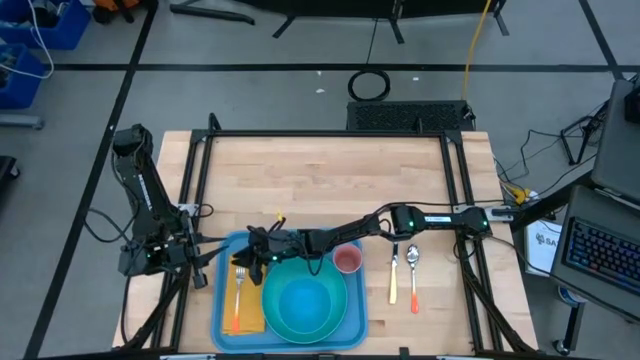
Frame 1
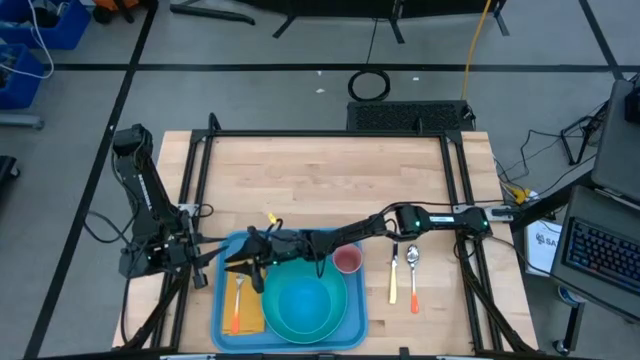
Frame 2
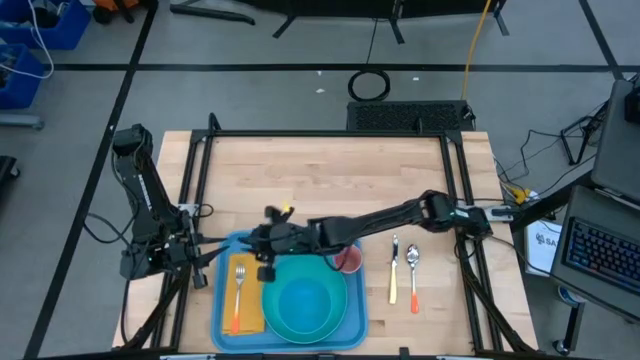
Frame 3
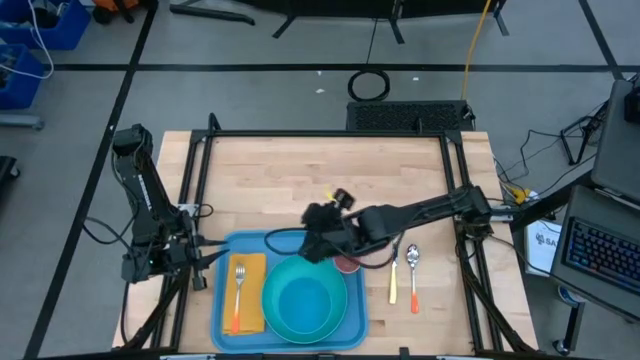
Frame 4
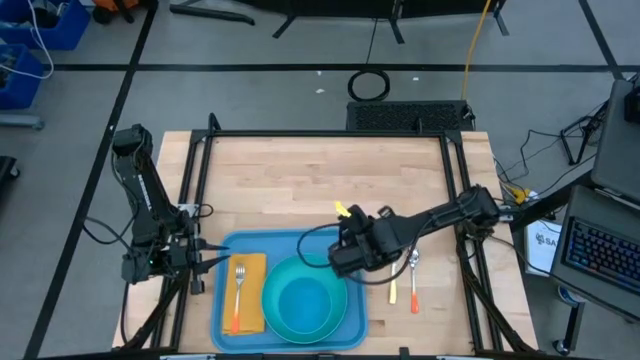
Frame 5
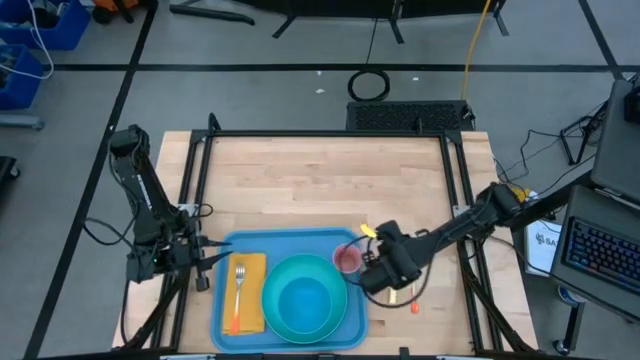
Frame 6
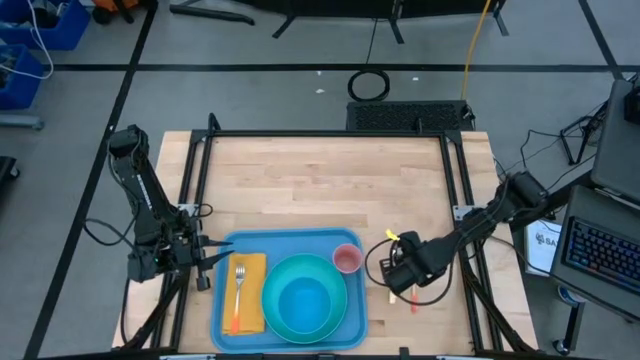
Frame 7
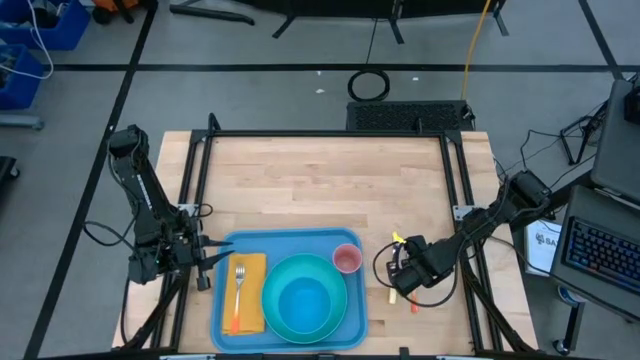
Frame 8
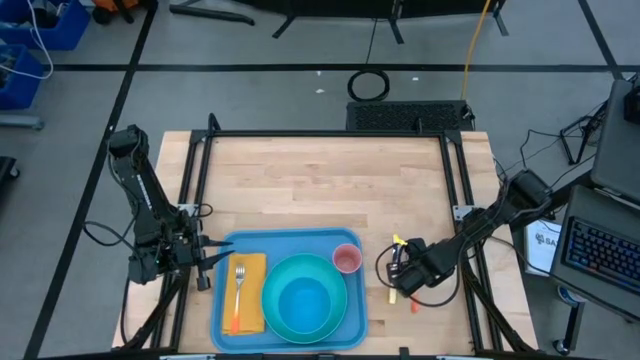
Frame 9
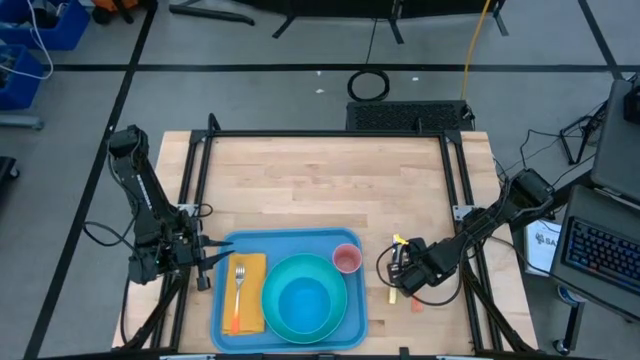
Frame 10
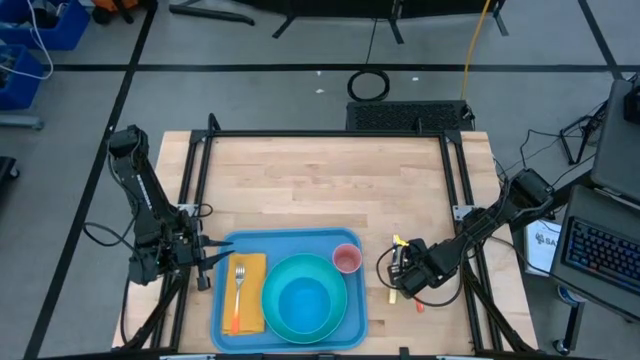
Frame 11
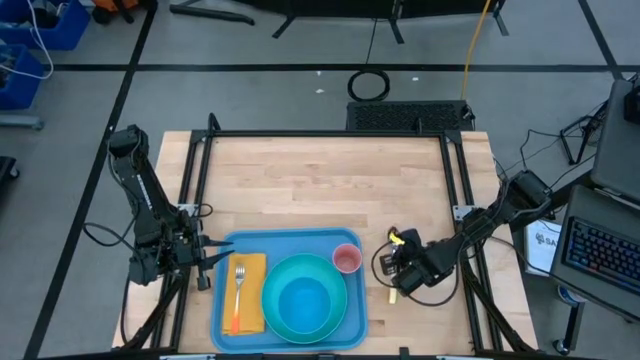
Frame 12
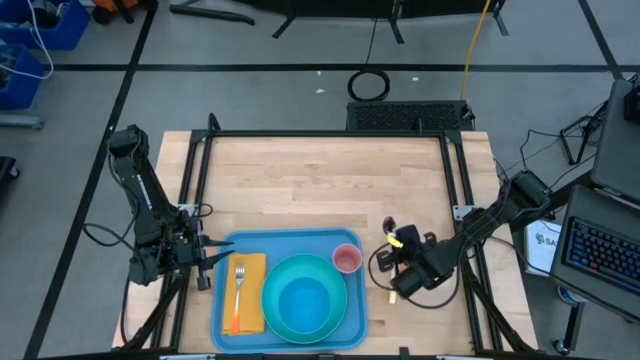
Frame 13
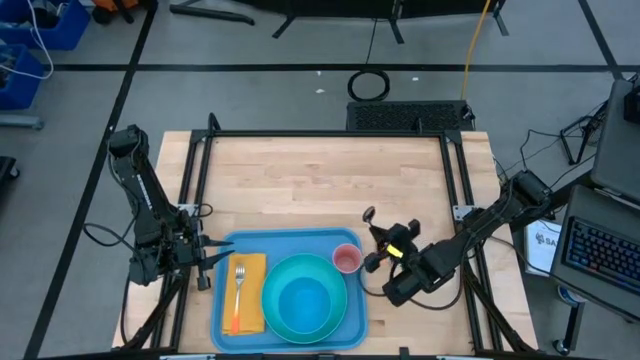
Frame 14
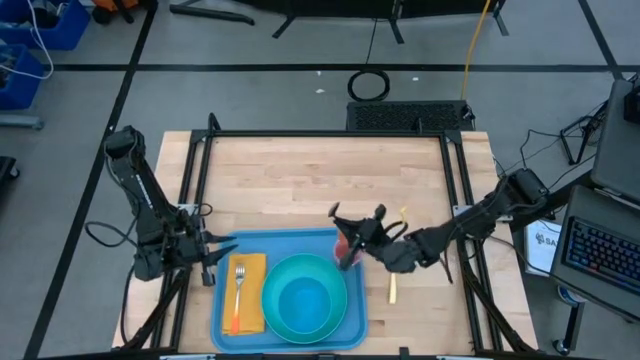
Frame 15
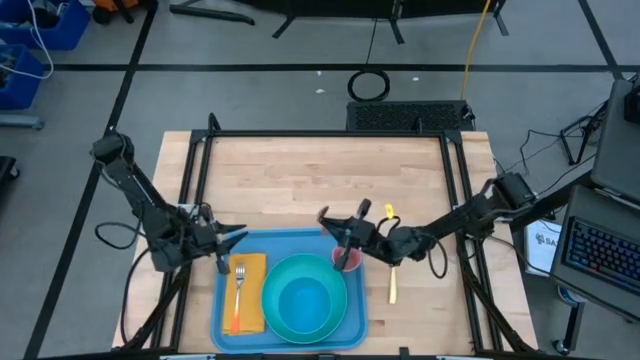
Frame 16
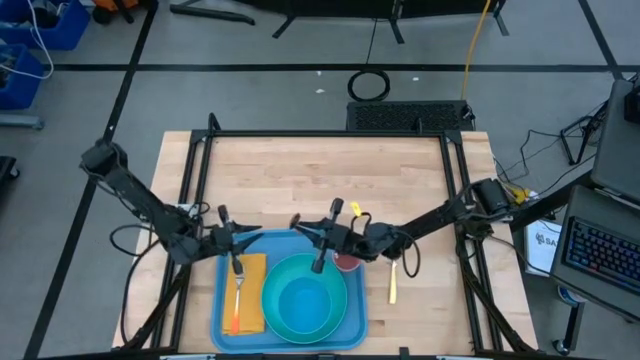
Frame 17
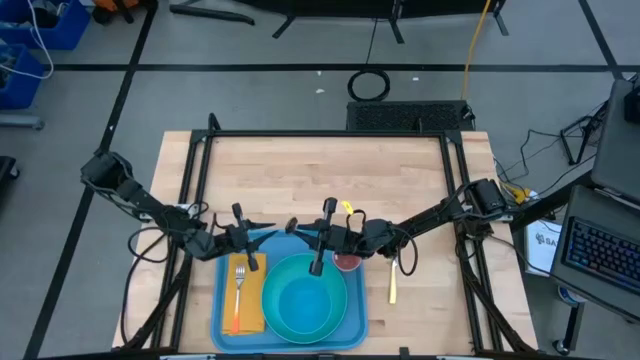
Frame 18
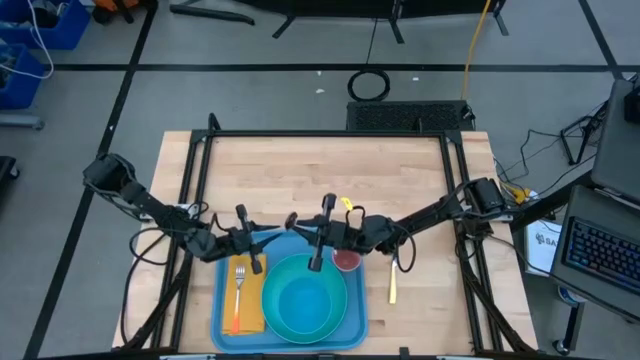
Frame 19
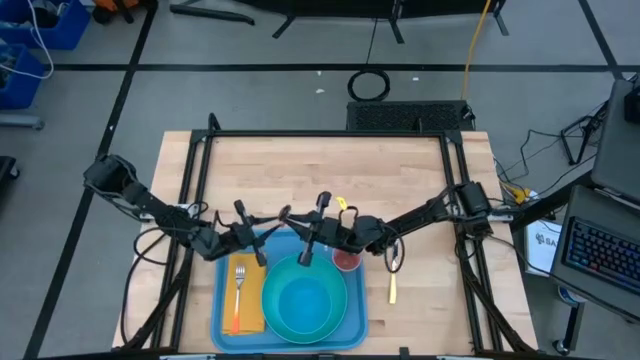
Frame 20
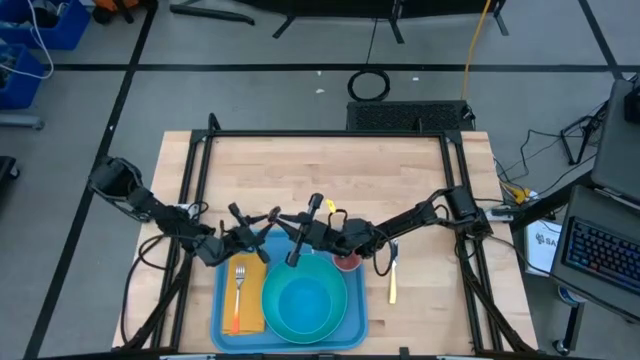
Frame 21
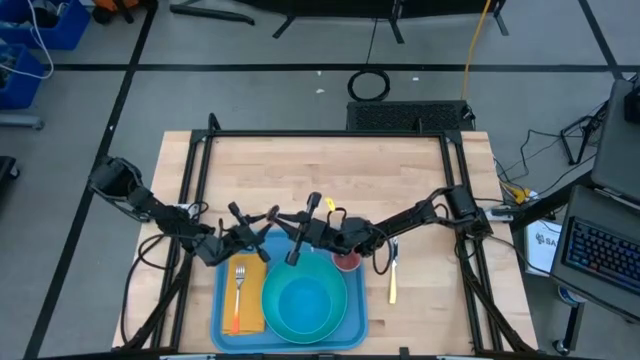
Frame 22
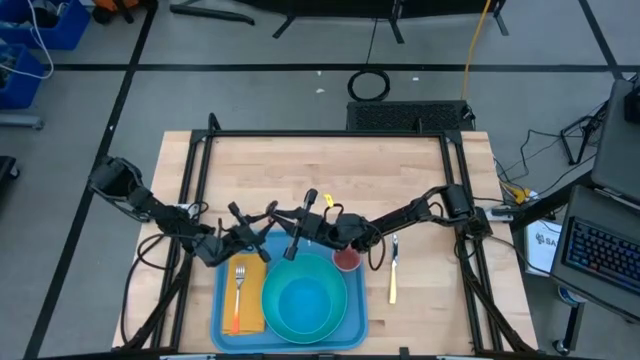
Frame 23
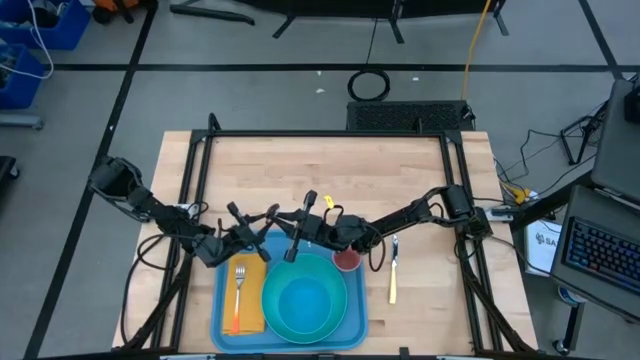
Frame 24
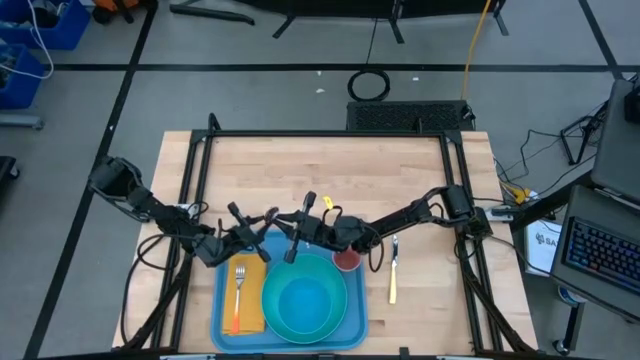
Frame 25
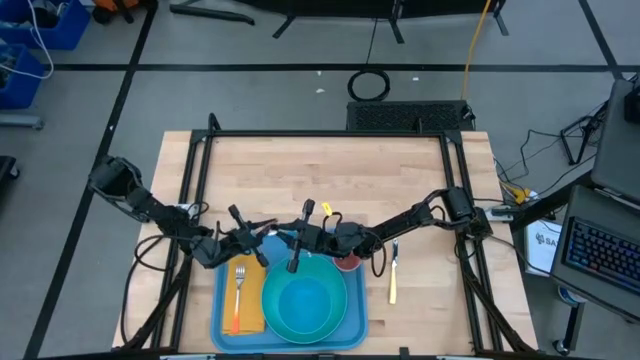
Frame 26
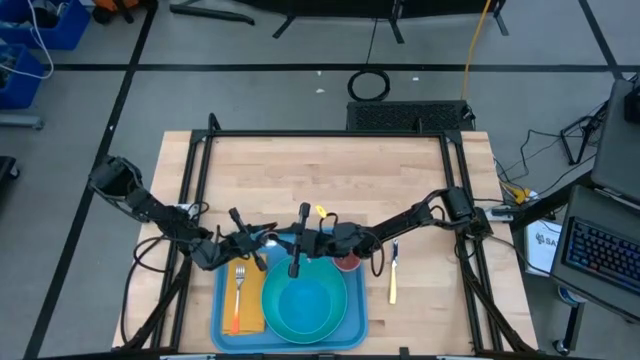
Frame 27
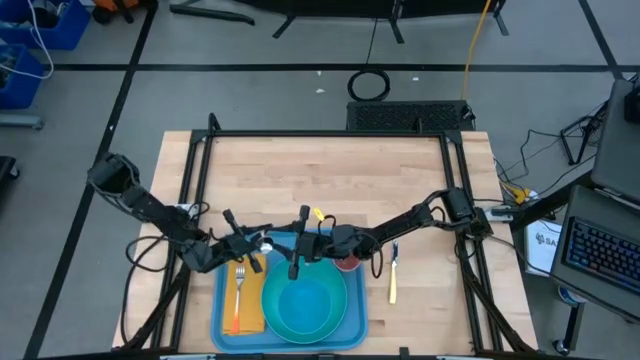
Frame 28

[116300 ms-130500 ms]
Task: Set up tray
Put the orange spoon to the right of the orange fork on the yellow table napkin
